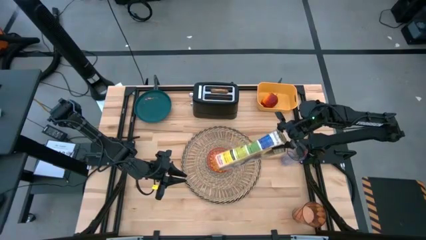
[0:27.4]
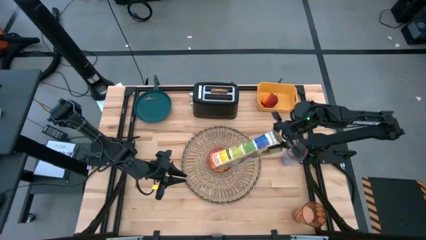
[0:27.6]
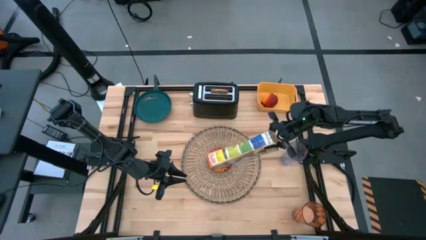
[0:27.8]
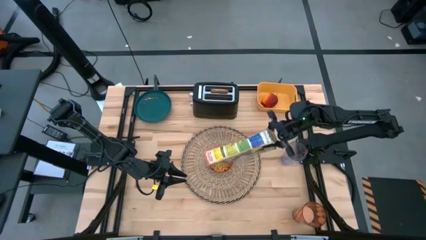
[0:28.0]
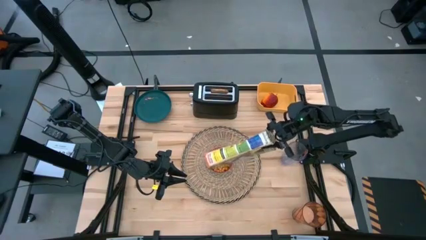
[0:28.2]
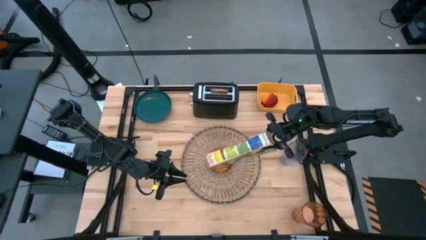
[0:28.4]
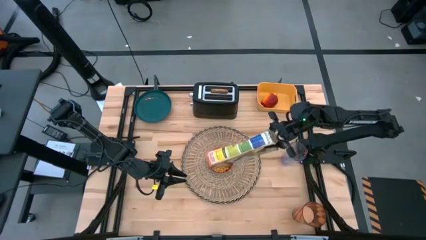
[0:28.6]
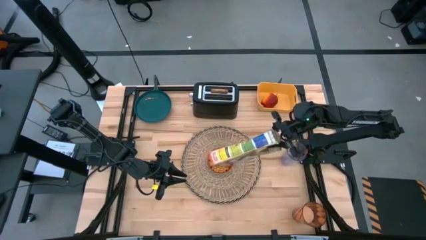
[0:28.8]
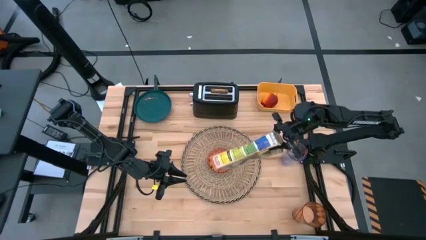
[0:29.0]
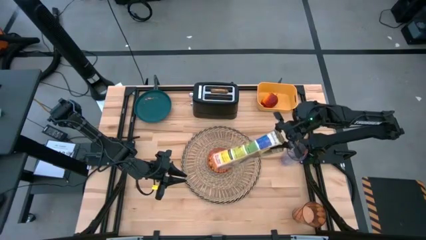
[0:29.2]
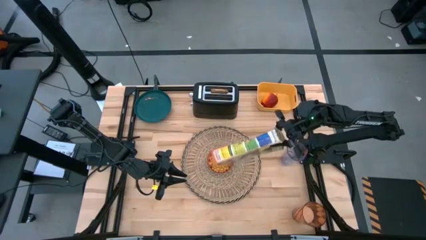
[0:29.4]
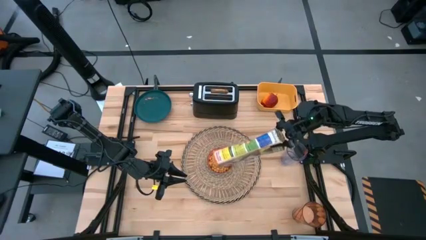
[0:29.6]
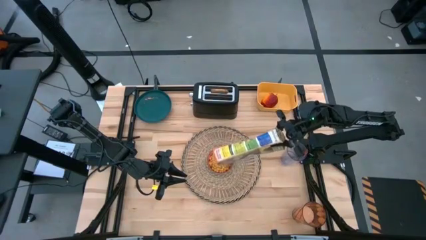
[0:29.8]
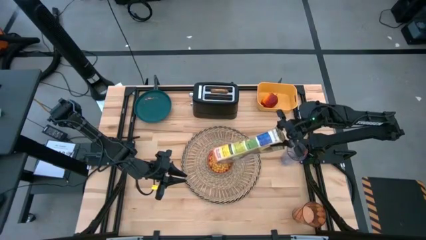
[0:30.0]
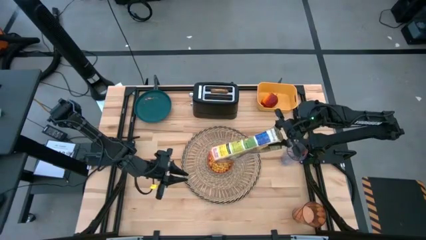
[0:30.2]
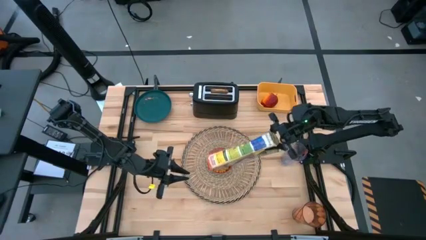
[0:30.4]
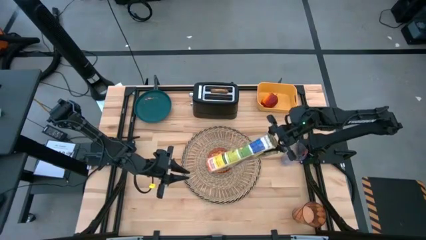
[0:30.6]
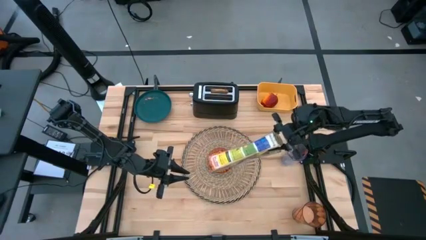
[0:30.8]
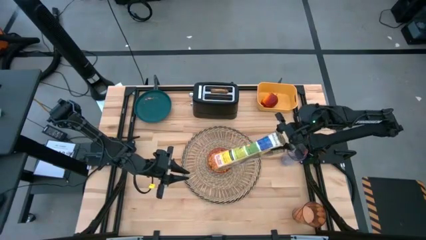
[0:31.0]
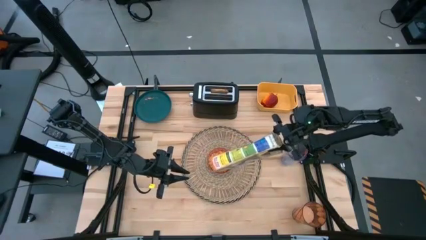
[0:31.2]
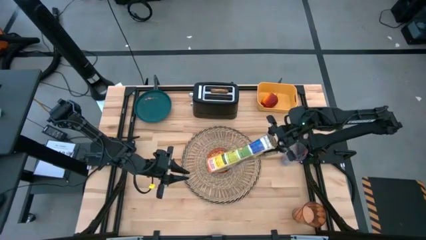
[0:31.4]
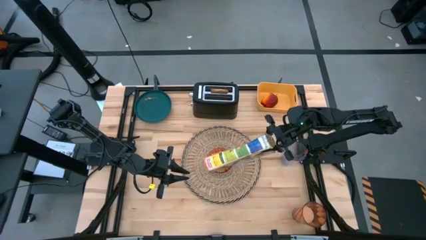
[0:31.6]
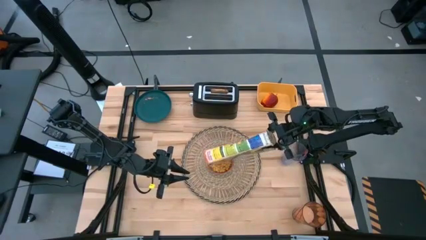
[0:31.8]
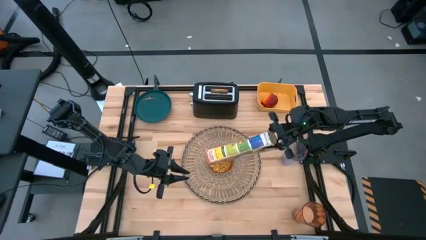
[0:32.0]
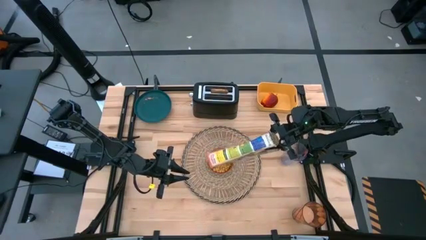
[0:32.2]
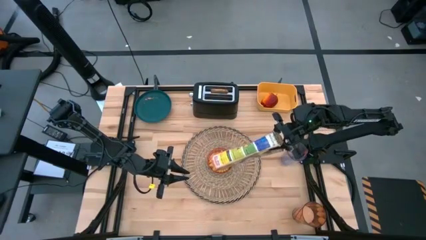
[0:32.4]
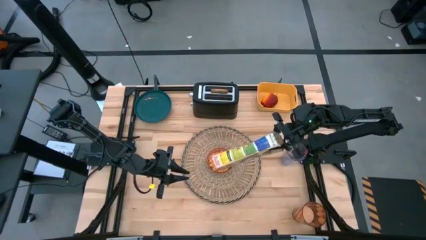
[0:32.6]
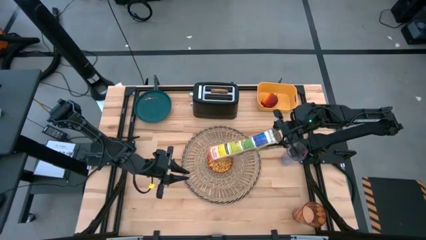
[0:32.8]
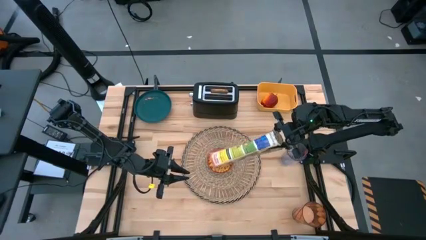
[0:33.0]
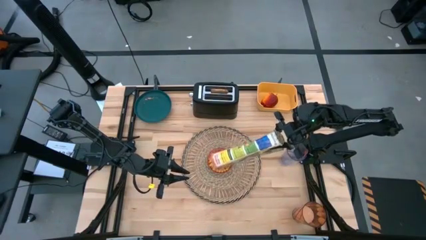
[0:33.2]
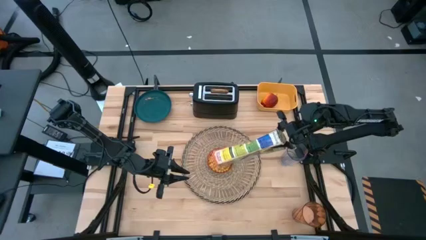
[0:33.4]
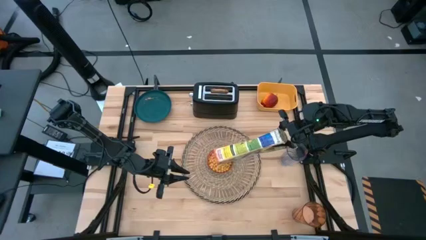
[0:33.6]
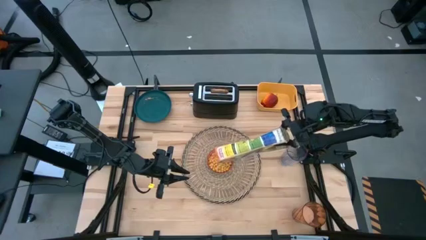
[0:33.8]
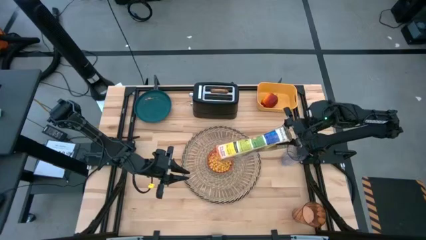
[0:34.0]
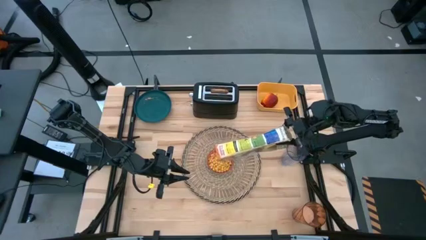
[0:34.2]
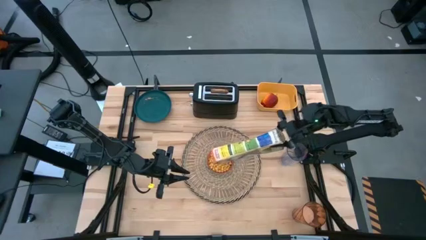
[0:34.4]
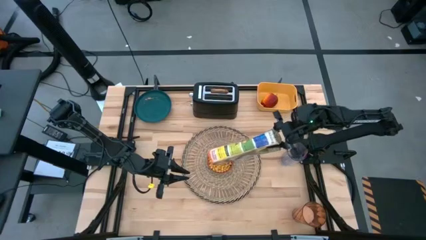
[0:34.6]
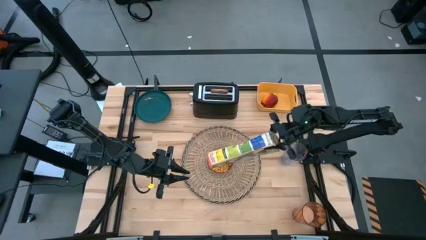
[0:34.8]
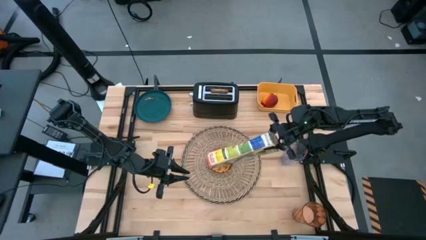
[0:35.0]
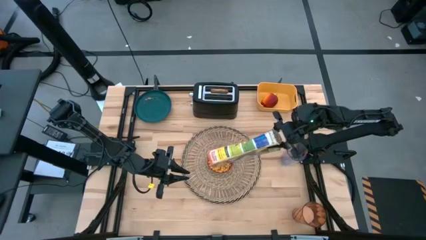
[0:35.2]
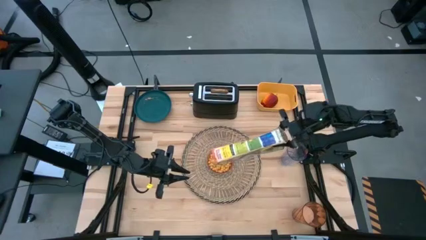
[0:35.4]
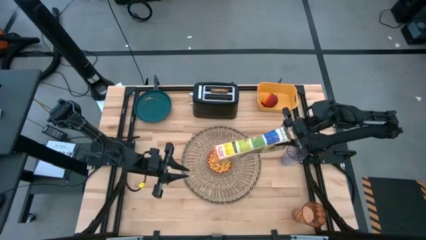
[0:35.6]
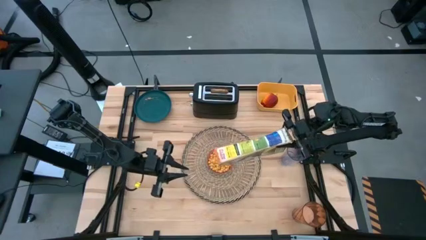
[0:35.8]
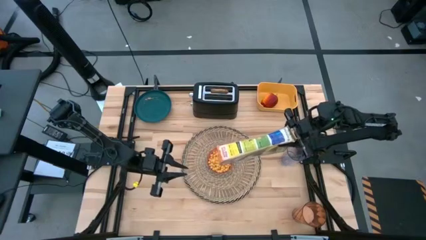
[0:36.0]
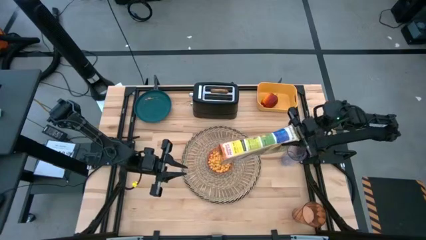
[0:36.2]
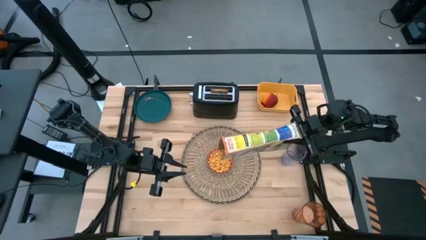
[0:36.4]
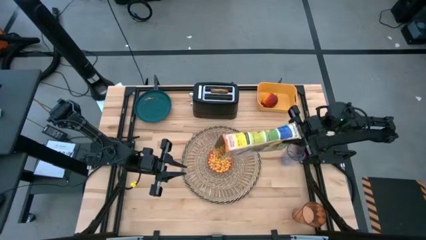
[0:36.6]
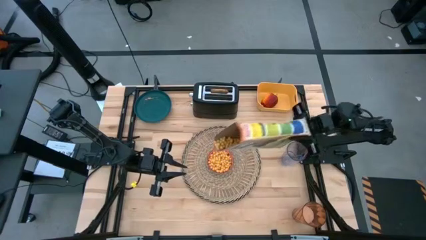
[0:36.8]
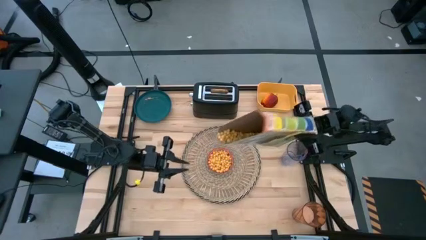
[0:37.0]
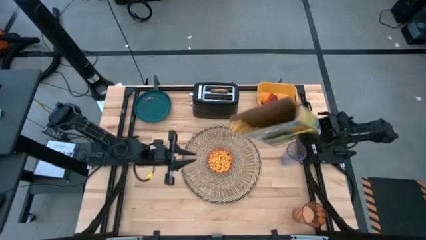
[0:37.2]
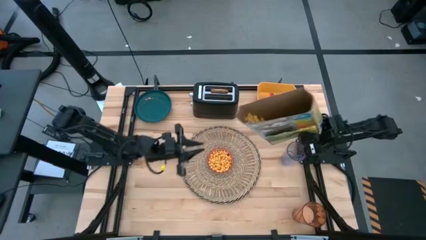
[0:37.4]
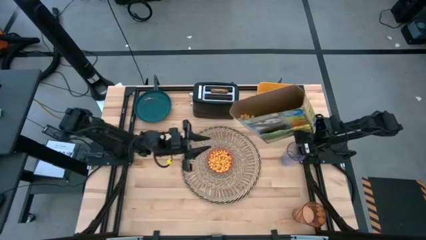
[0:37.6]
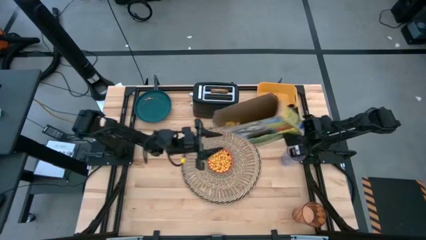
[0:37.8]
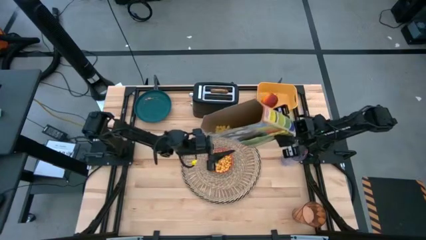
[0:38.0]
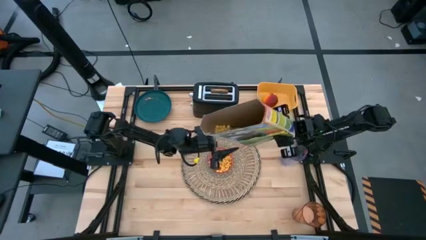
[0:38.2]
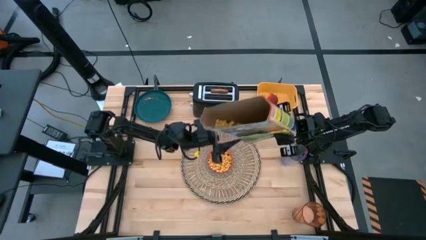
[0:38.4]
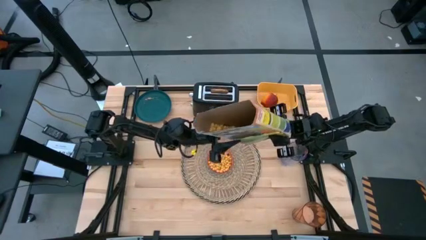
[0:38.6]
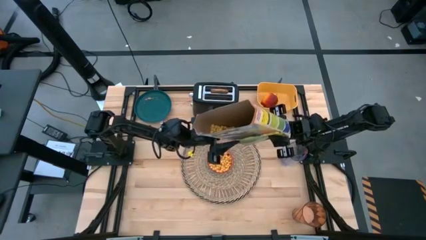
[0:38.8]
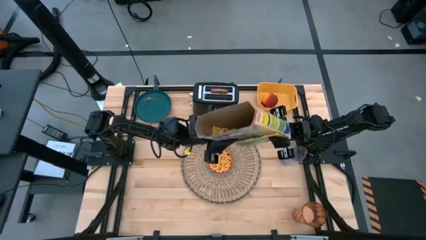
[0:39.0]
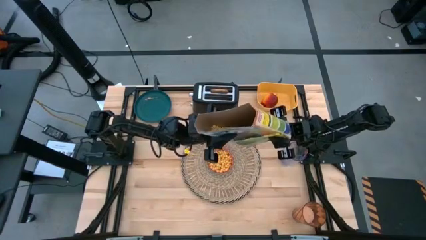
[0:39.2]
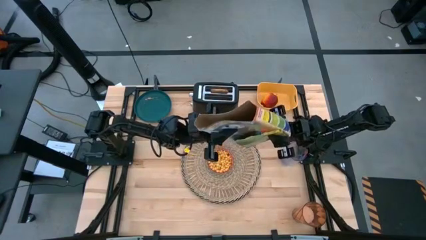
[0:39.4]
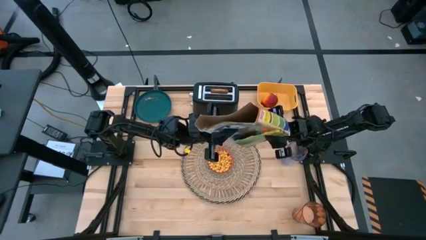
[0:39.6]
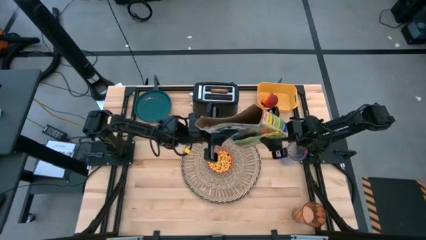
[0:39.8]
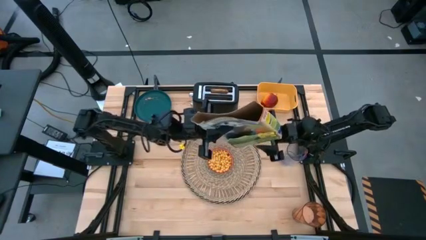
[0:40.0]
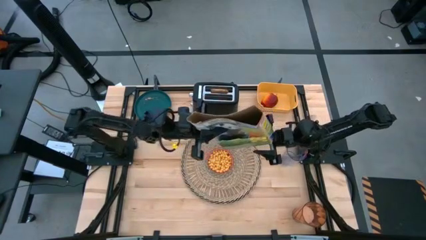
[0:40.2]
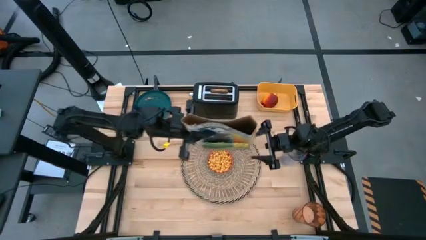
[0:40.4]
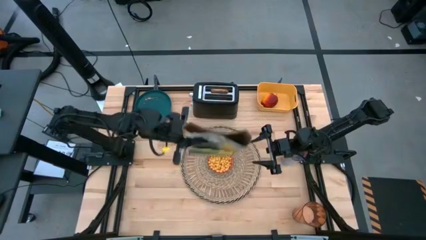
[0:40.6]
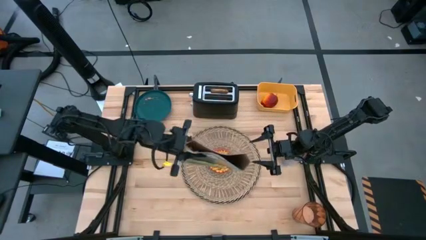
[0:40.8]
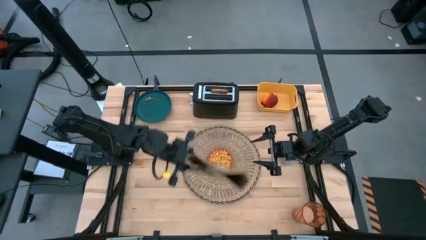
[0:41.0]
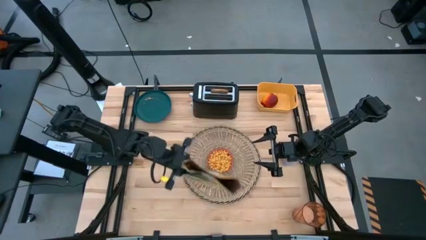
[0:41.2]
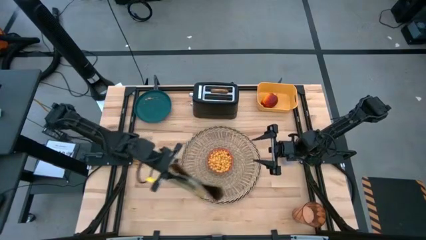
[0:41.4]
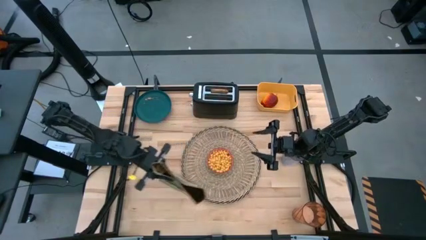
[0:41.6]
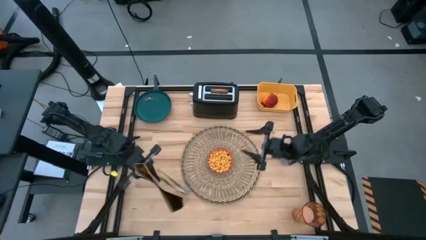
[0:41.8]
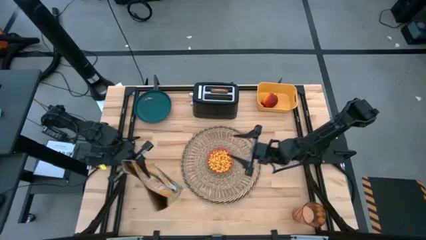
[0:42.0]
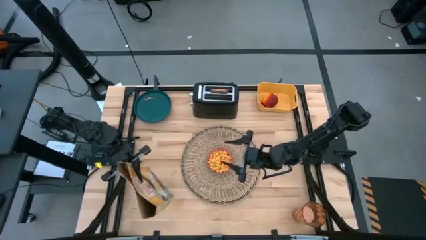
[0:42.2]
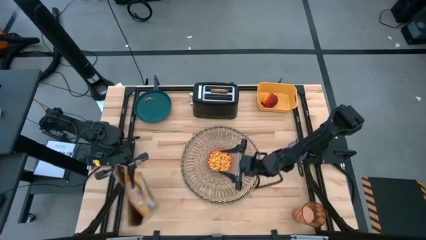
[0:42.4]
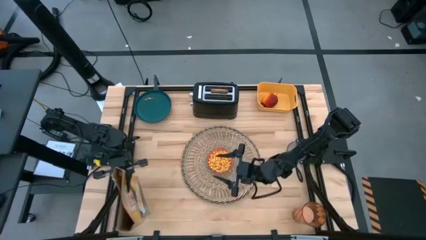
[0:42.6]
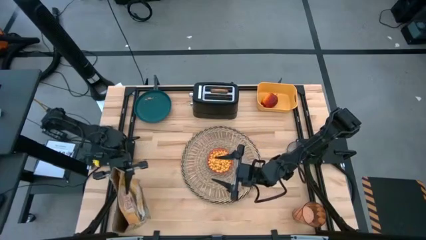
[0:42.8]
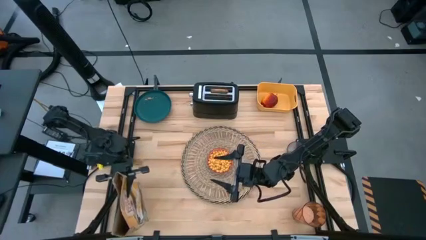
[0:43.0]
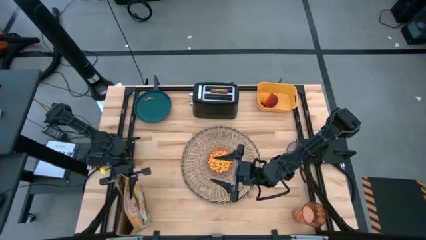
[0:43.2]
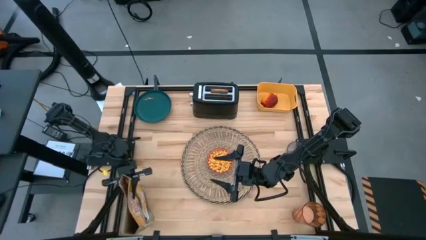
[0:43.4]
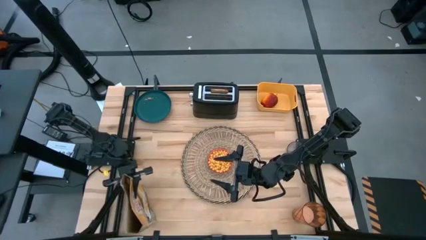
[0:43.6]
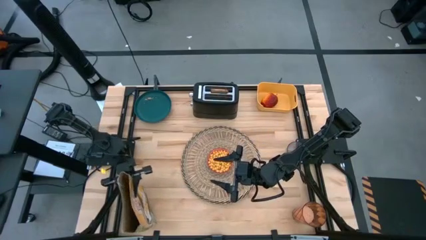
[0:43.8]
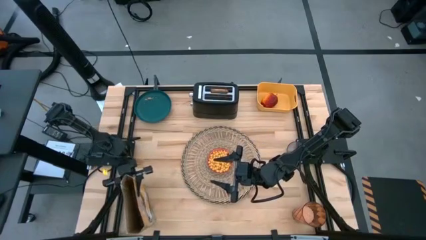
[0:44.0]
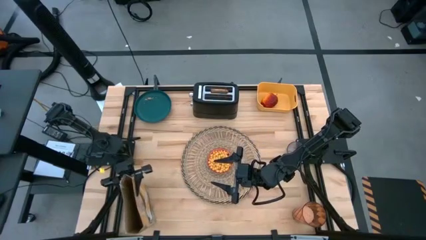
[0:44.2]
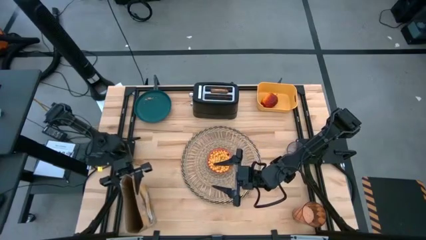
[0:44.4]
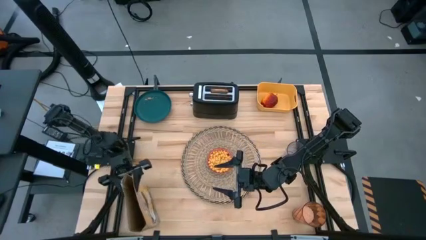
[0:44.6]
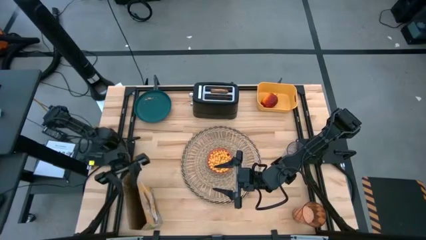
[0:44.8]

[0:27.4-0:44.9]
Task: Arrange a breakfast setting
Pour the cereal from the yellow cereal box into the red bowl
